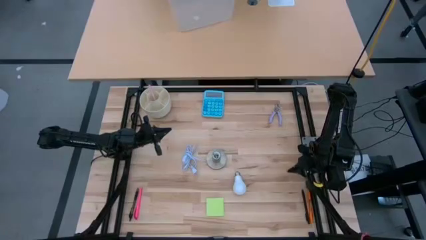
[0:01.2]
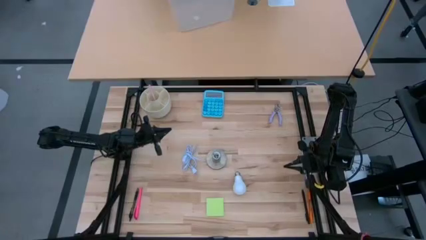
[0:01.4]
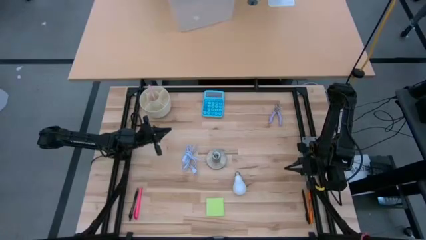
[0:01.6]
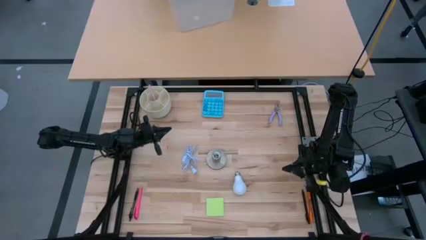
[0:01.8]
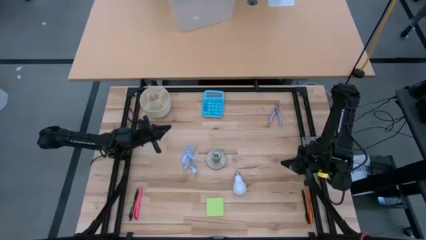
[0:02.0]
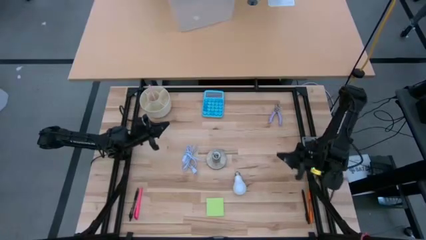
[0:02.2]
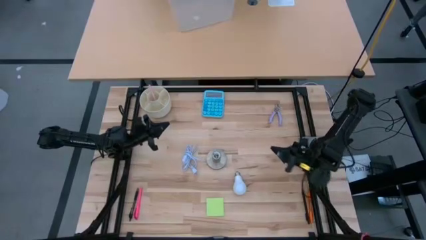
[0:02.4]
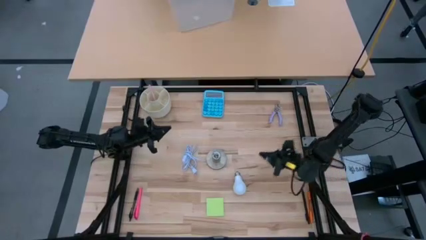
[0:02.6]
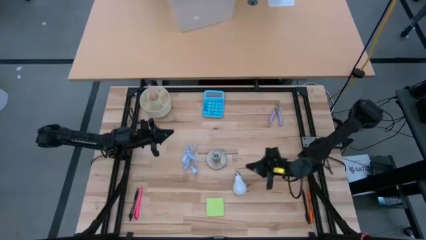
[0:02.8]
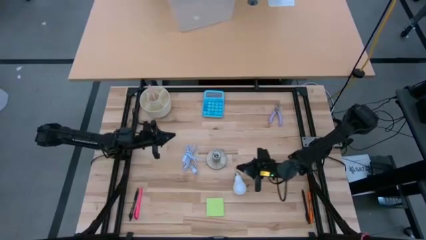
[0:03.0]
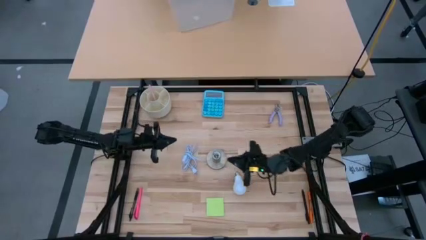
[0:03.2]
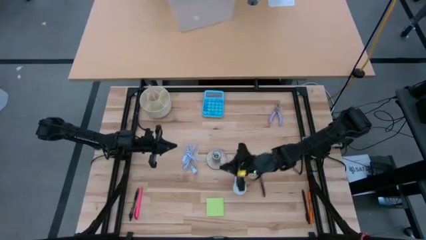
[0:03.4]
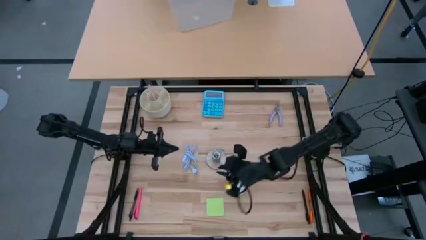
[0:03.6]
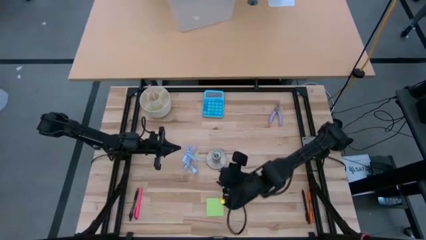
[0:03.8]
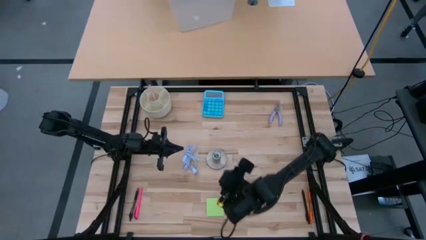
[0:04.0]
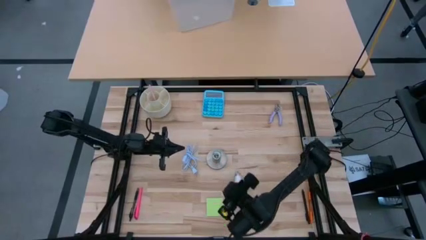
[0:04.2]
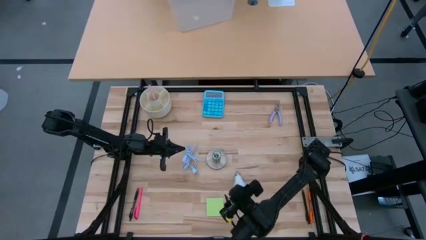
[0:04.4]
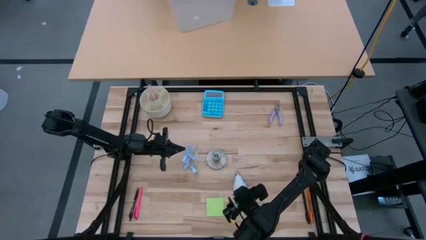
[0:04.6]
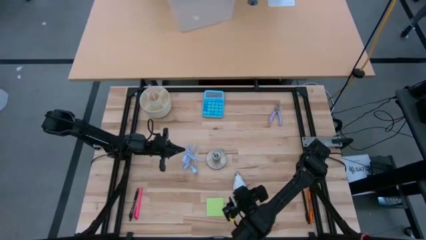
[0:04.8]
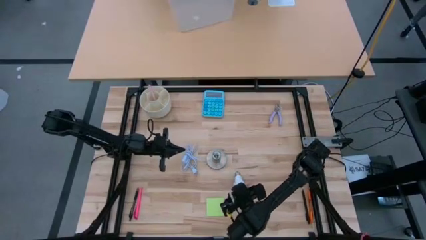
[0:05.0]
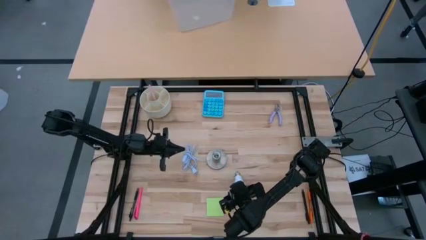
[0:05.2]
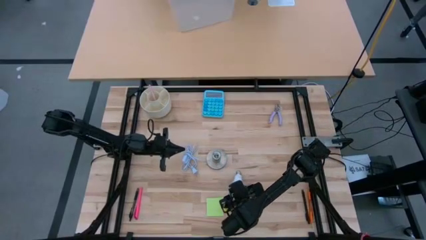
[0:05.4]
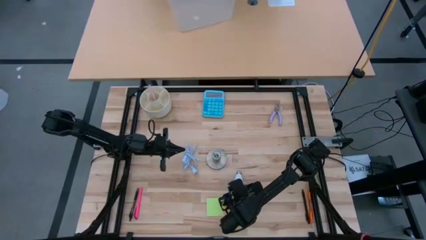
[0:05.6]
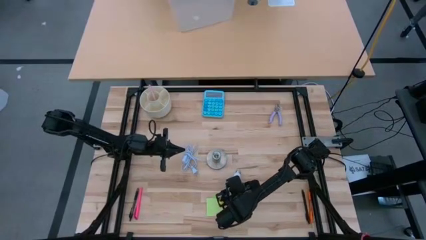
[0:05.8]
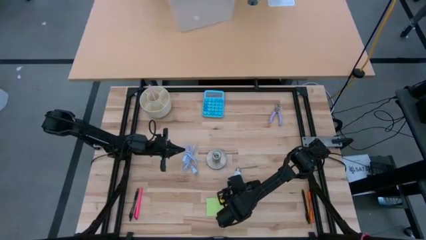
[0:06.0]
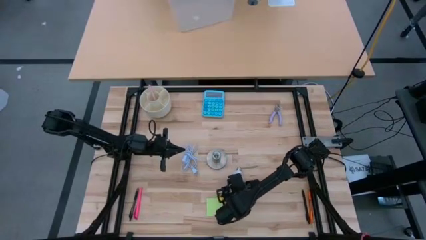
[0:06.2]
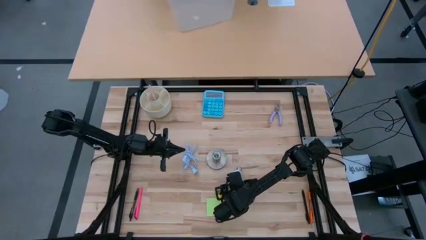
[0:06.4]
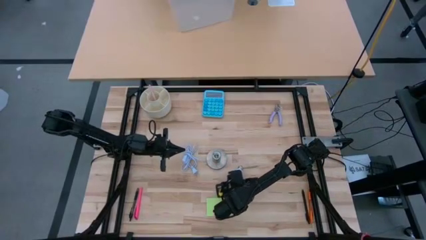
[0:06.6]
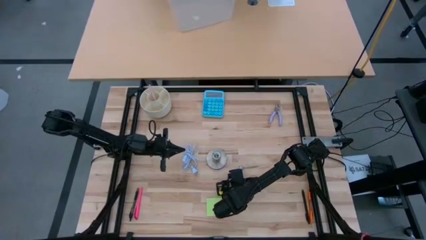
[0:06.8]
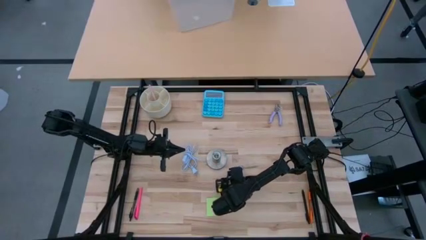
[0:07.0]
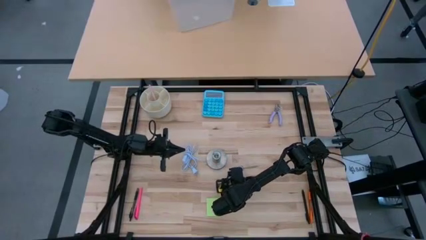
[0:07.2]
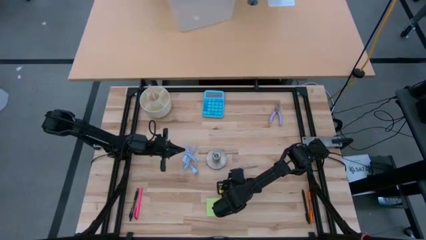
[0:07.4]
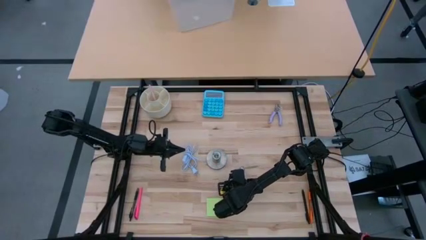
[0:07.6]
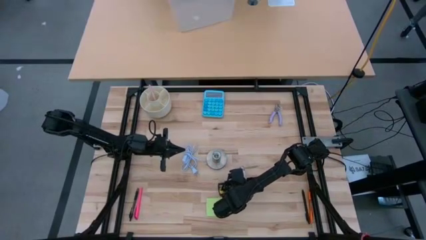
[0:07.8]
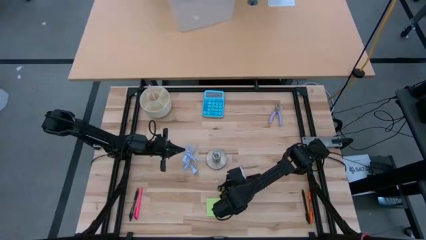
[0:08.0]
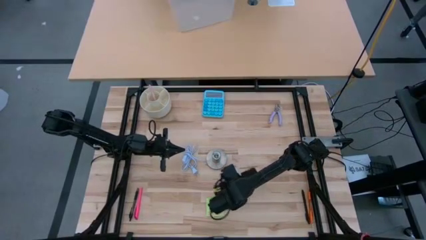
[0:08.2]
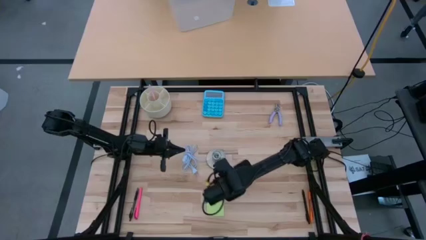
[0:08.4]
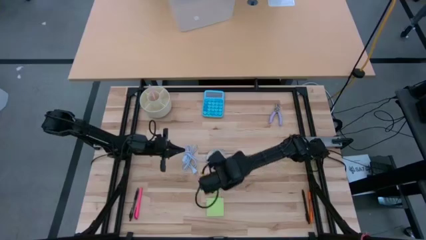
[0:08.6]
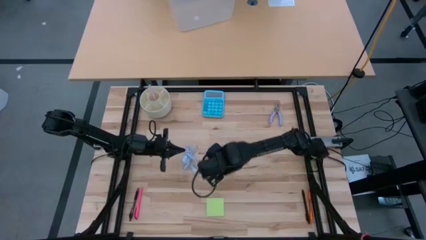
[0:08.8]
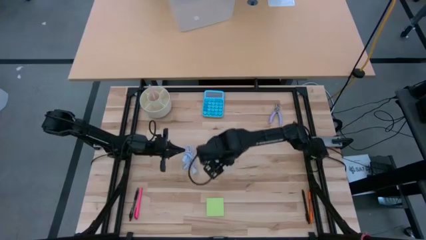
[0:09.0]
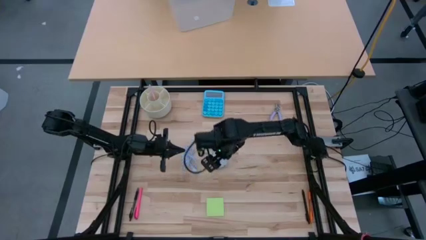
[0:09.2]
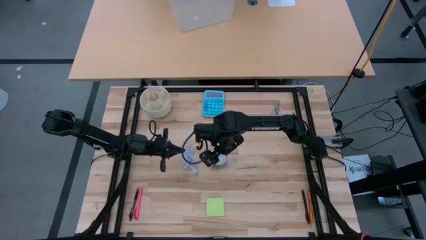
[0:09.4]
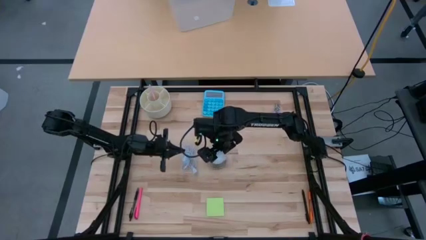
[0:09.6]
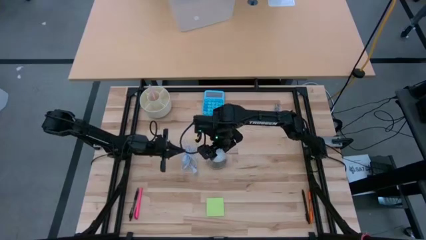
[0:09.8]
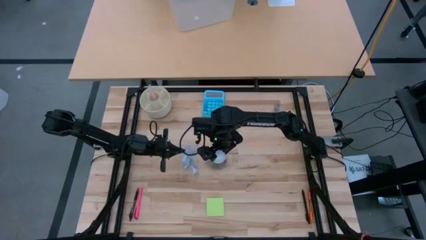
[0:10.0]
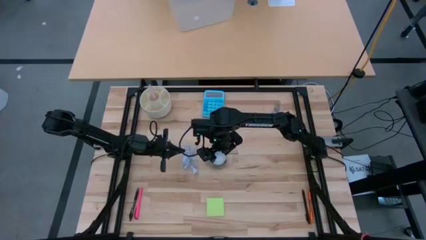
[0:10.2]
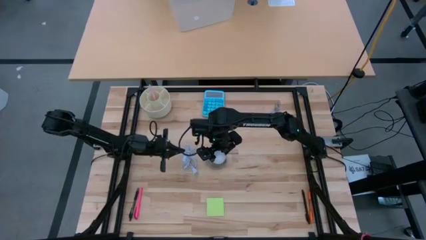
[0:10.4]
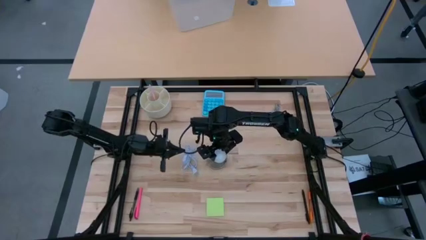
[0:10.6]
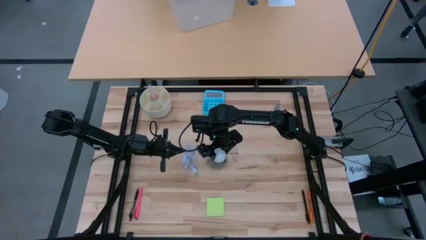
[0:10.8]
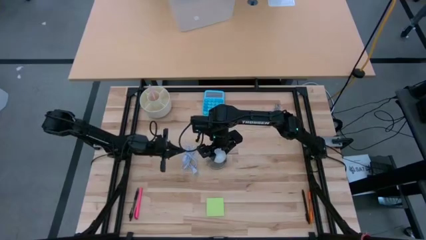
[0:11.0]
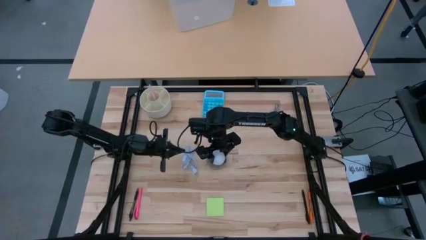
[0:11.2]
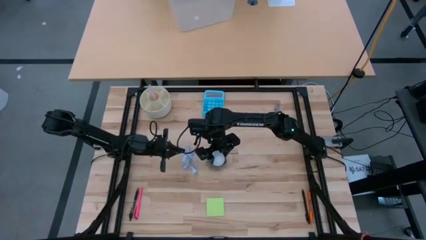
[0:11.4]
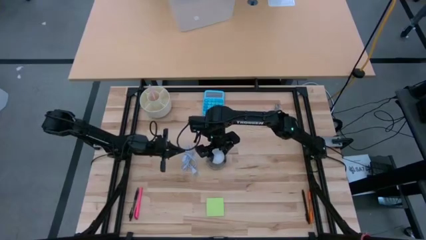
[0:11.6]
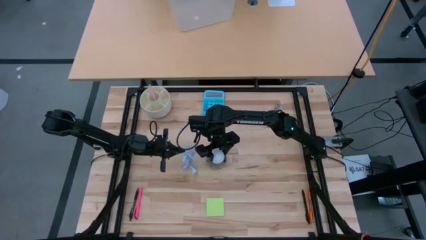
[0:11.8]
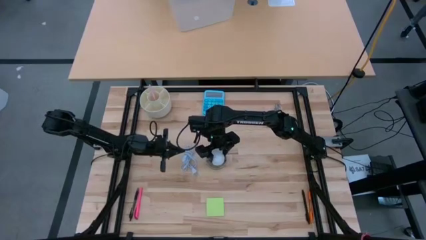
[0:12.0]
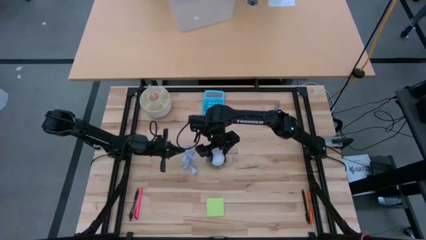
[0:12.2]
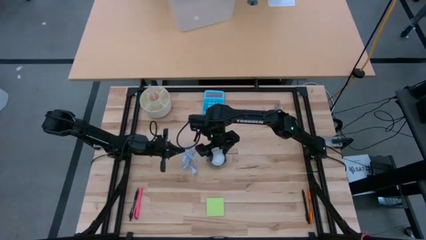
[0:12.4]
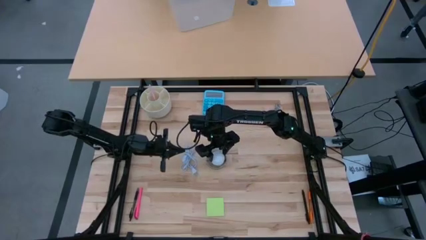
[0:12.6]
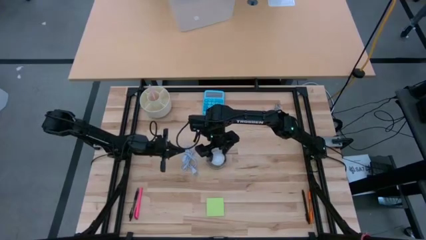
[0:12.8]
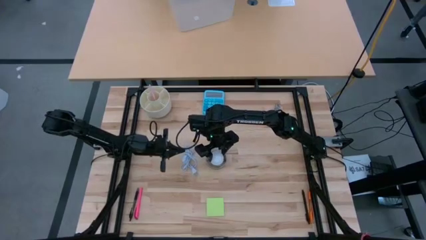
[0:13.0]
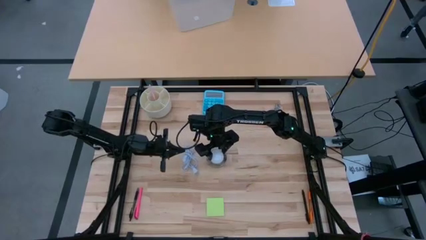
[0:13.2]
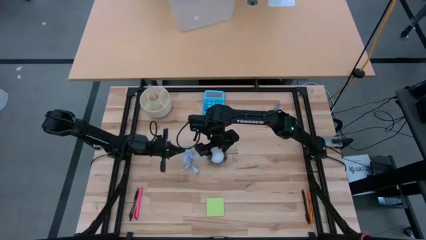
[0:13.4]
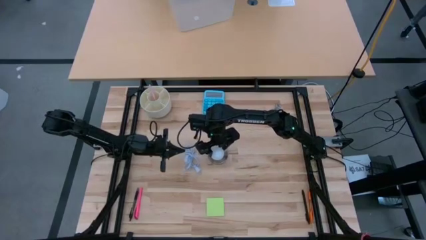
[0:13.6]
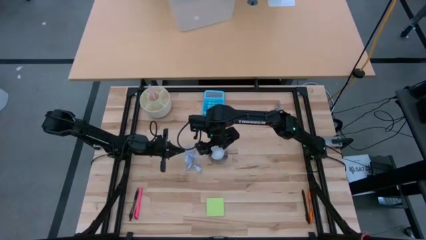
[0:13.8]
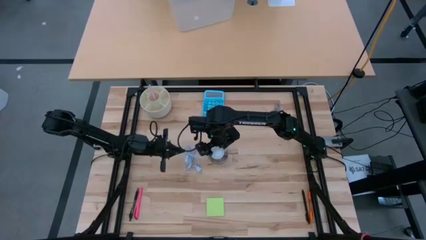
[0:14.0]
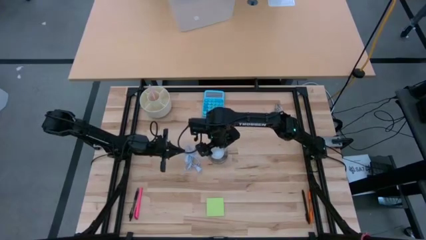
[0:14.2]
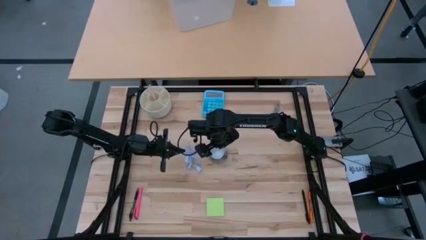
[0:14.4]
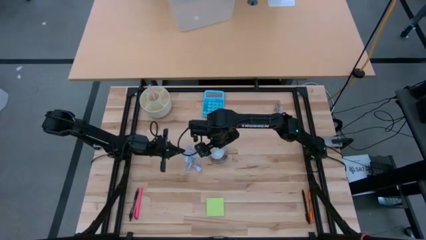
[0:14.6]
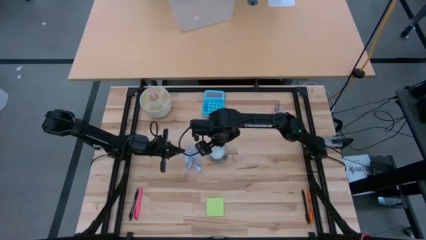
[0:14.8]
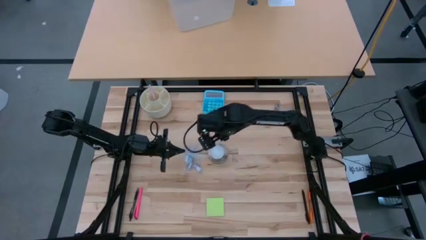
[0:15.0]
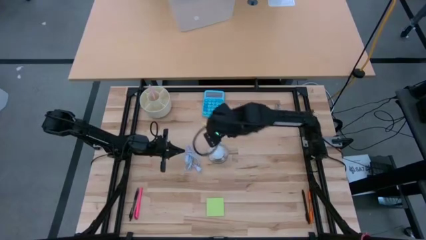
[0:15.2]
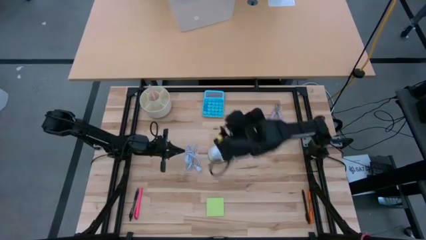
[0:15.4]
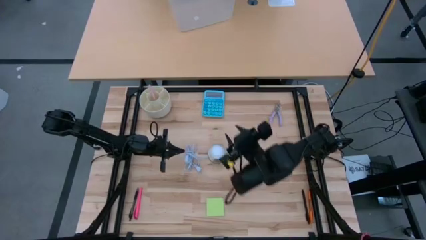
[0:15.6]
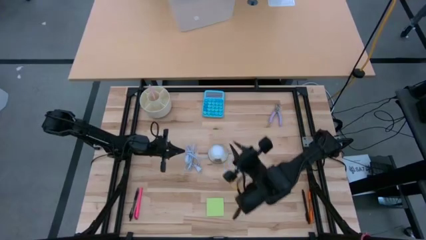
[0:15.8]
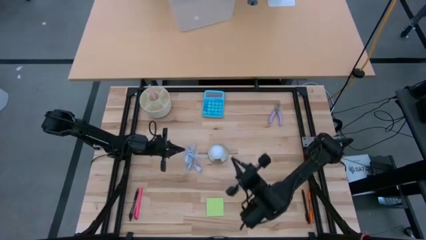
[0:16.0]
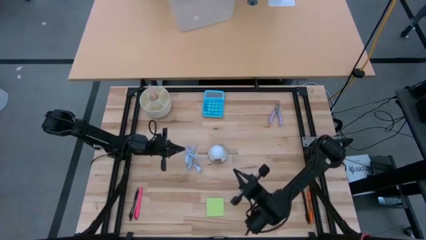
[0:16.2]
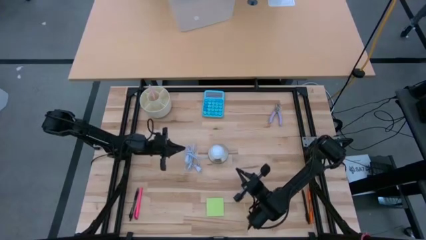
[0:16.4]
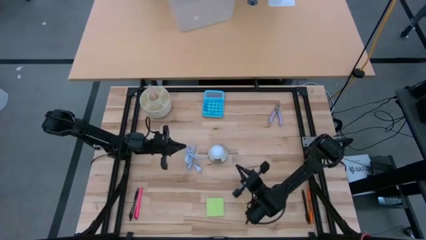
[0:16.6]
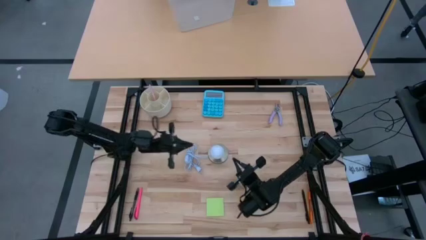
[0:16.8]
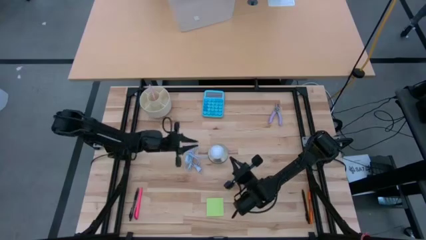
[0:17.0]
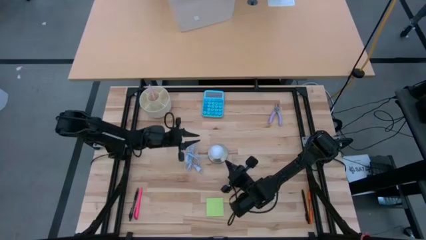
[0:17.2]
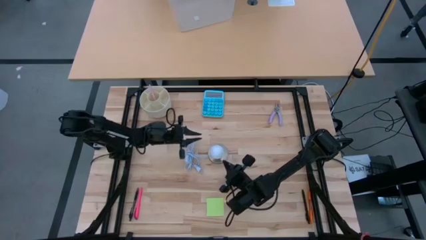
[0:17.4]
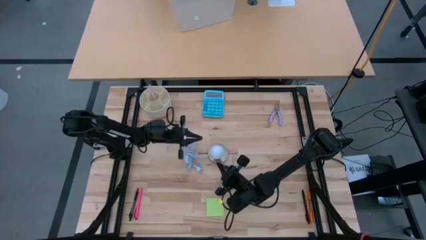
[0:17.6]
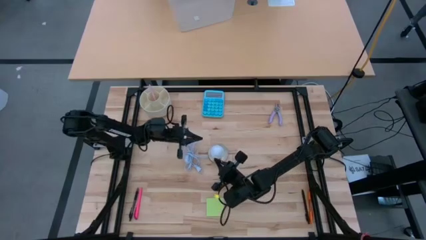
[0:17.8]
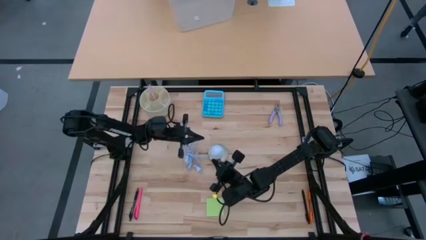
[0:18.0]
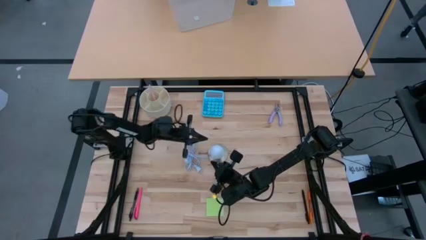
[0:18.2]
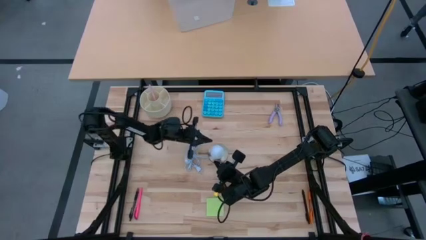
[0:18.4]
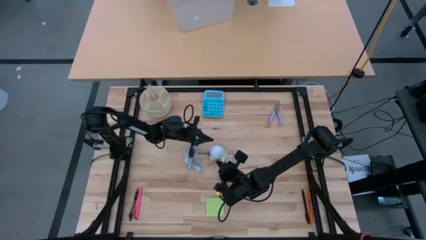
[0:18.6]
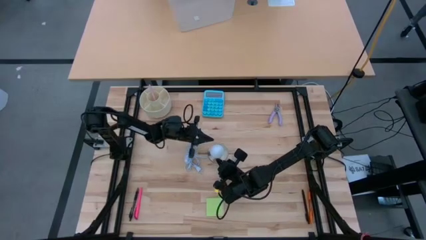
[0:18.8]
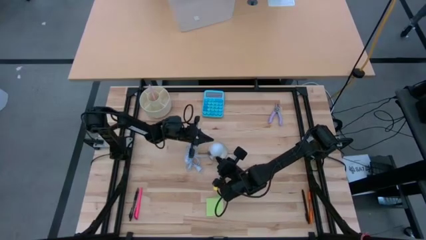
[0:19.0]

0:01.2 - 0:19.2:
Task: Screw lightbulb
Insert the lightbulb into the lamp
